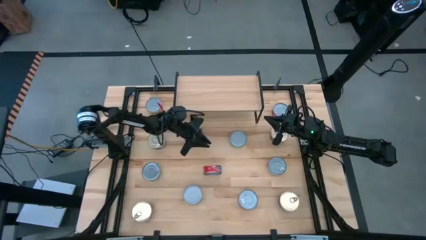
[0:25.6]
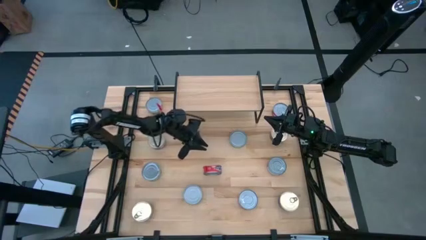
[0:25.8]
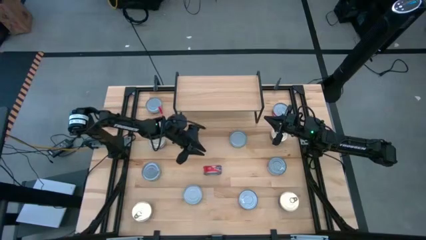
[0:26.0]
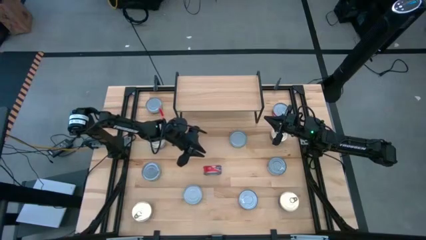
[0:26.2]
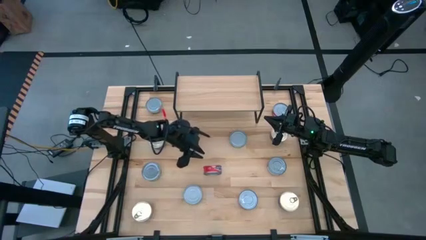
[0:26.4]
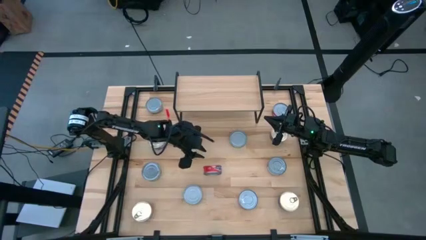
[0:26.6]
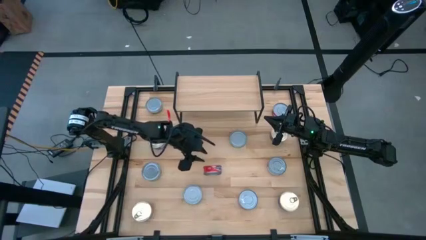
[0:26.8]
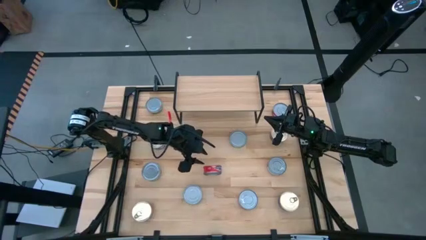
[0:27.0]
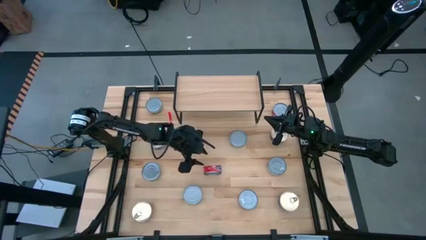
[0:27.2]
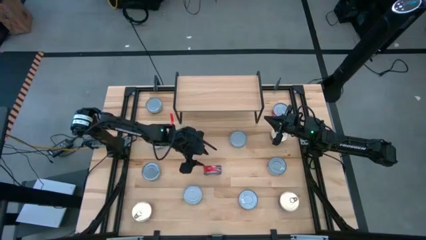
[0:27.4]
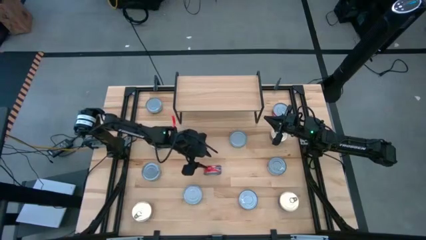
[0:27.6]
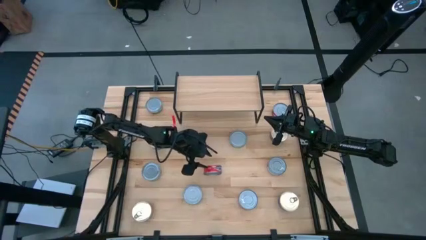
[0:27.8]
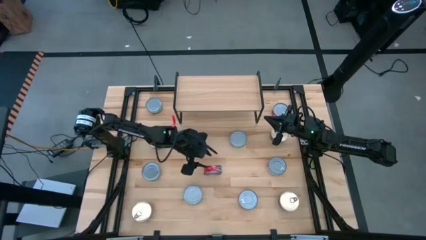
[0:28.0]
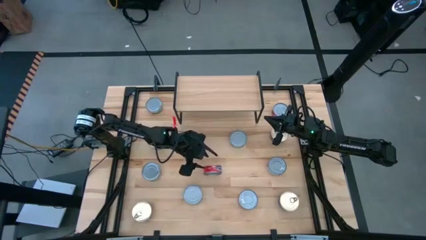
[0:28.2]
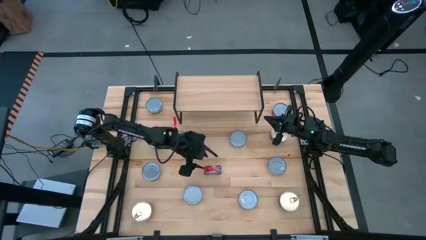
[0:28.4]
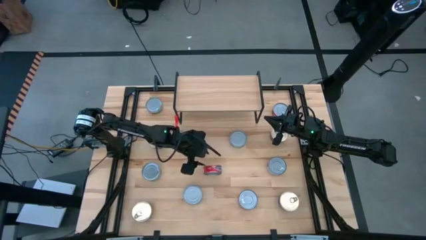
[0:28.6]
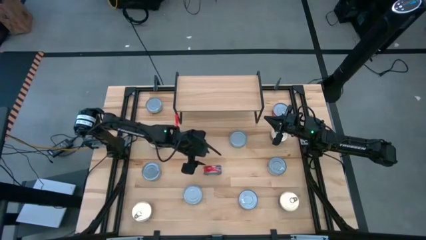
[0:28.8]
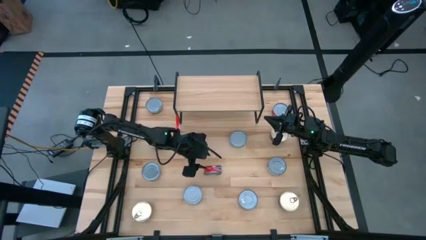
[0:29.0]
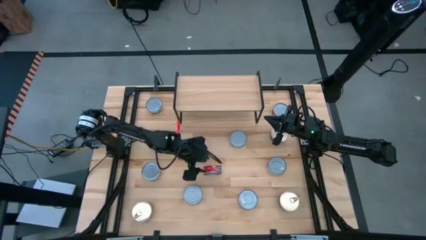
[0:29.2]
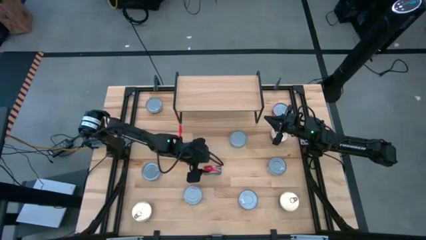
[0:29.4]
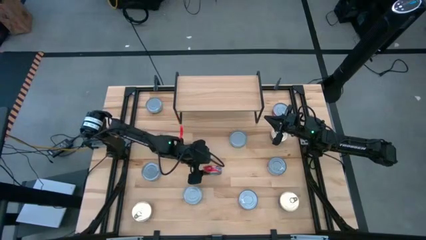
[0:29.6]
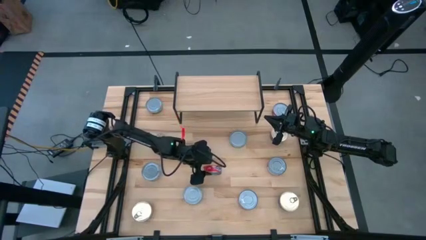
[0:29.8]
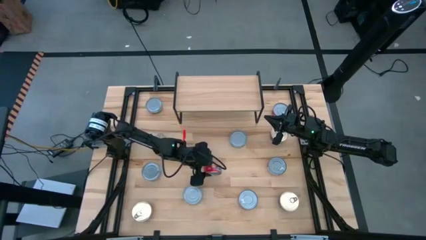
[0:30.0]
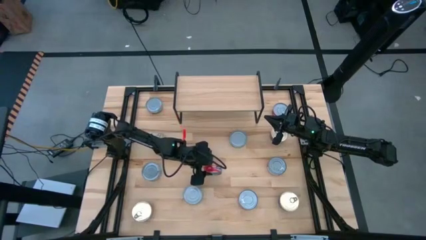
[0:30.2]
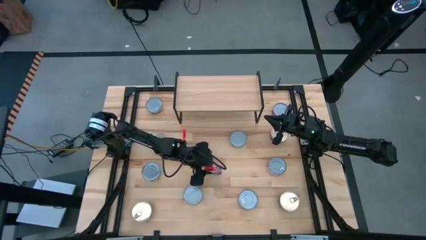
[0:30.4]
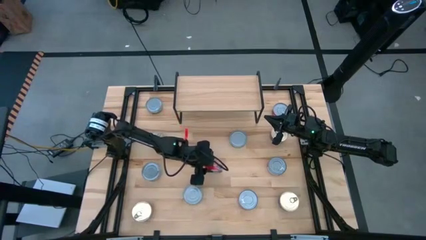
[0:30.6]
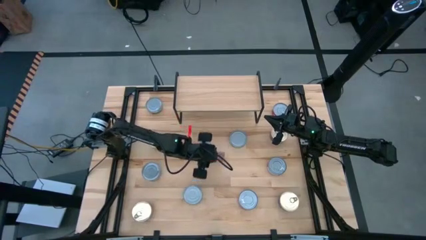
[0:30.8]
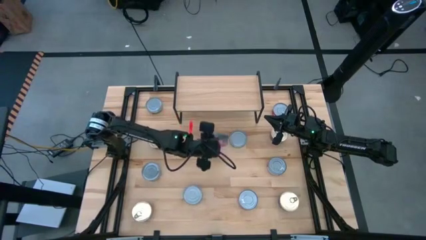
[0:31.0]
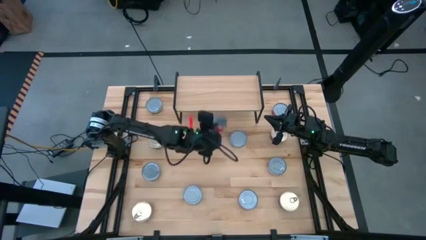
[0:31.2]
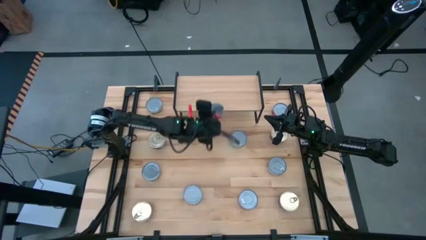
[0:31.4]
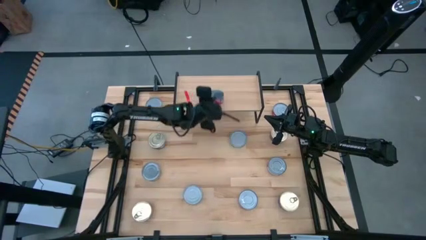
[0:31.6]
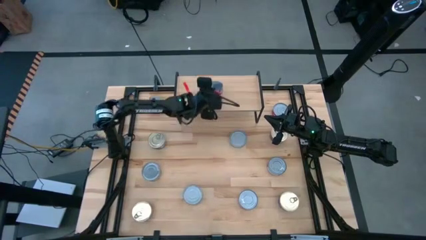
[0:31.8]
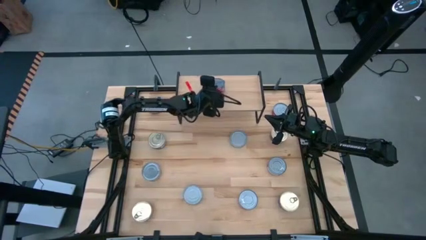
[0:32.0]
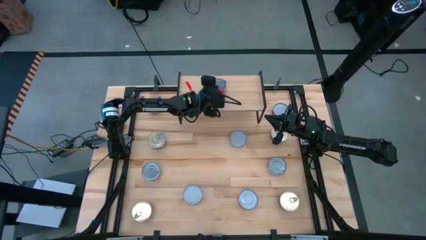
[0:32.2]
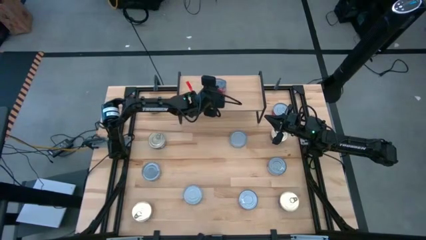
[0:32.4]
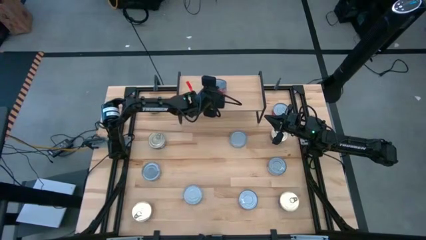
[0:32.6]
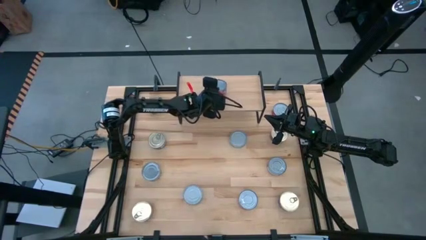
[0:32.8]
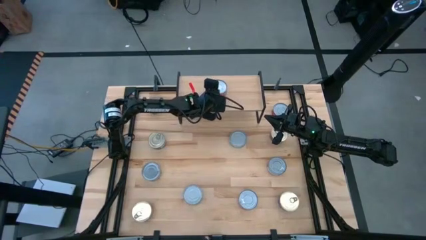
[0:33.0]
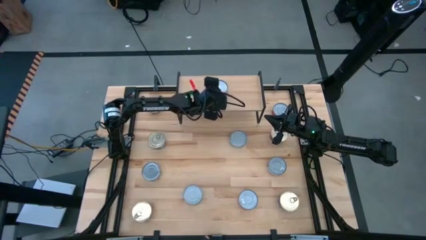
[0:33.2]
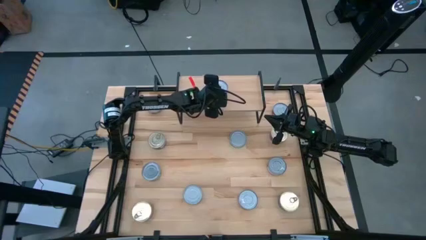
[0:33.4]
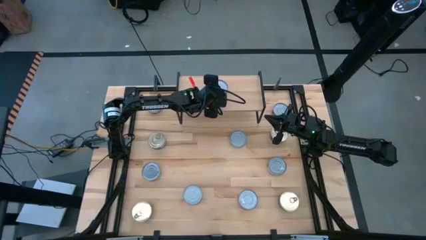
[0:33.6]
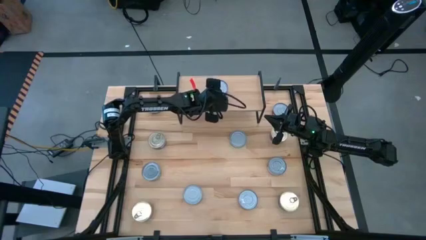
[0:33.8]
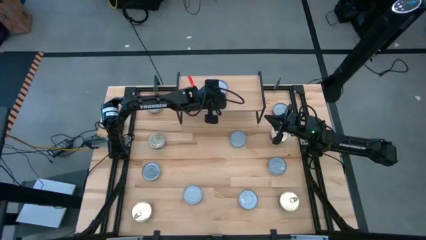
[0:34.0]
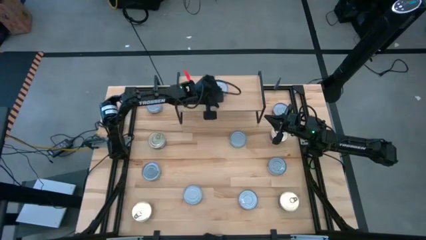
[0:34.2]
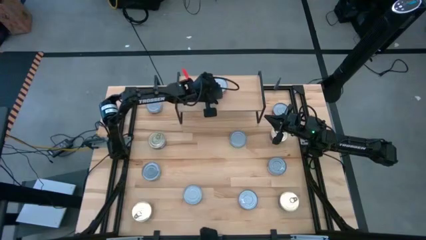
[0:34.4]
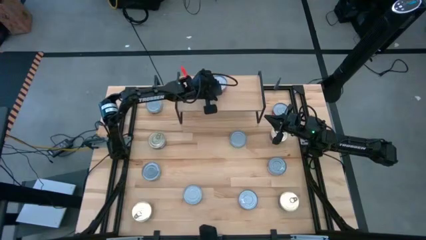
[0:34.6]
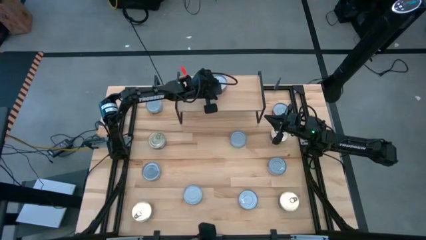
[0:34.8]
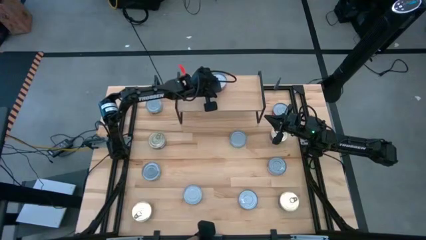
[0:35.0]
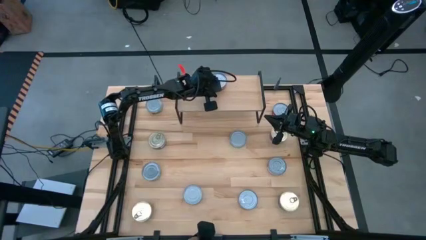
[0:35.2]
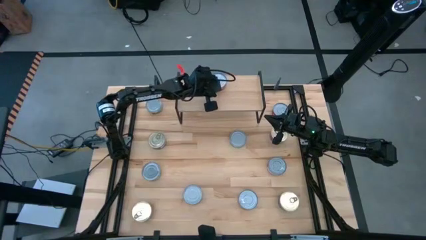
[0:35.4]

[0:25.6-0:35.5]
Task: Stack canned seafood by type on shelf
Put the red tuna can on the shelf

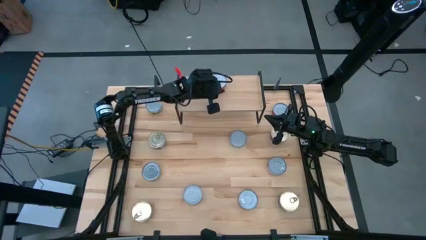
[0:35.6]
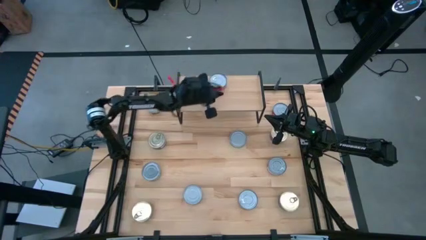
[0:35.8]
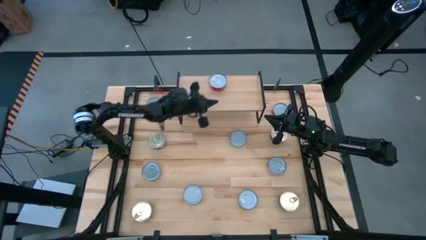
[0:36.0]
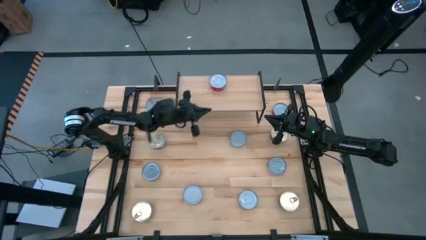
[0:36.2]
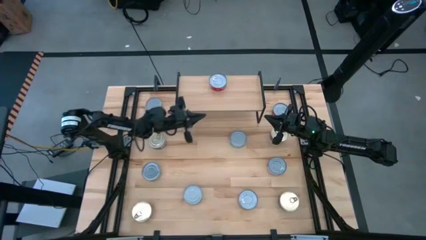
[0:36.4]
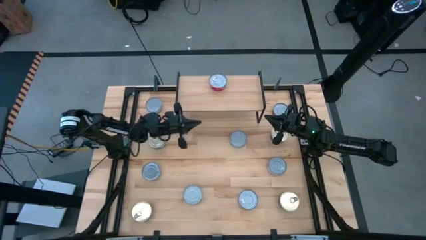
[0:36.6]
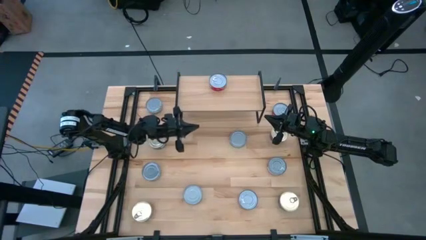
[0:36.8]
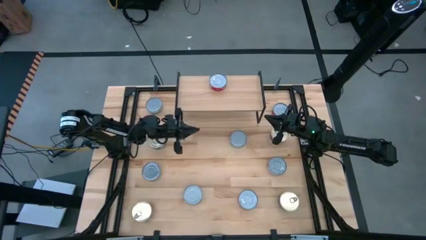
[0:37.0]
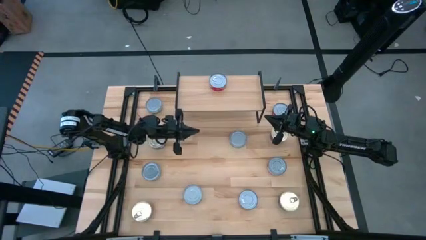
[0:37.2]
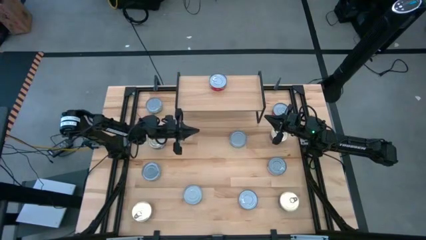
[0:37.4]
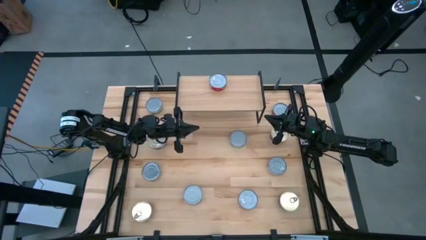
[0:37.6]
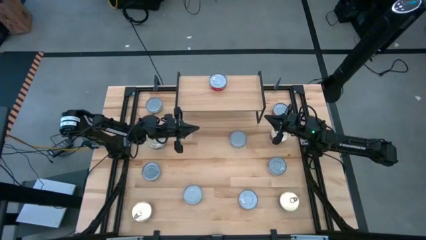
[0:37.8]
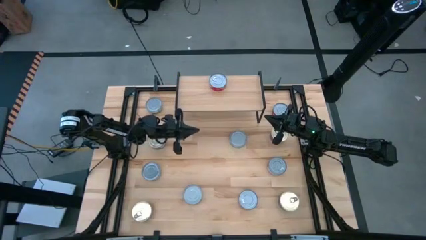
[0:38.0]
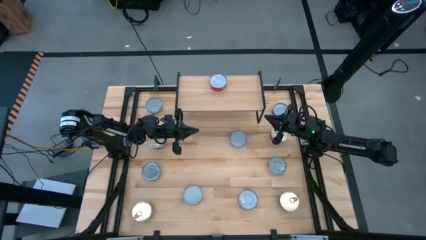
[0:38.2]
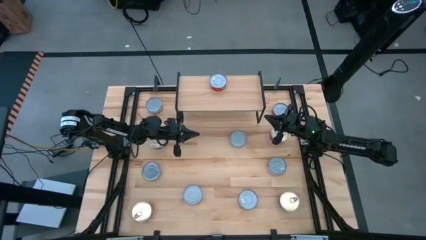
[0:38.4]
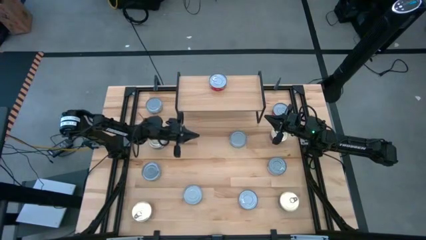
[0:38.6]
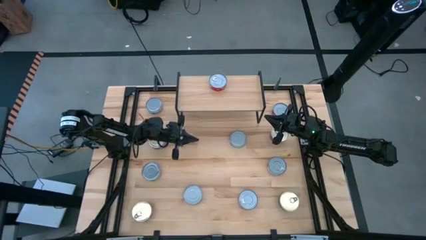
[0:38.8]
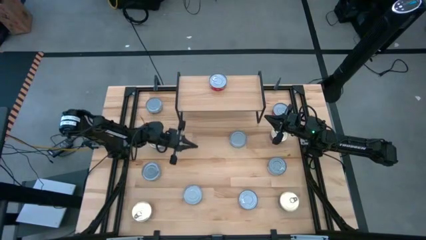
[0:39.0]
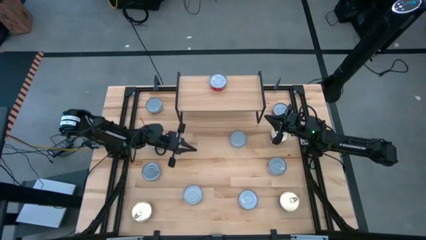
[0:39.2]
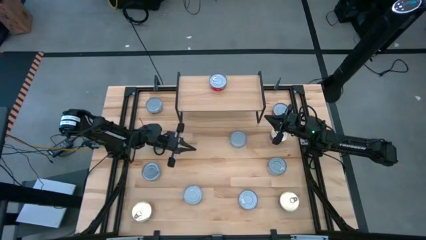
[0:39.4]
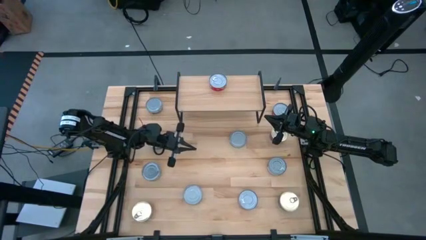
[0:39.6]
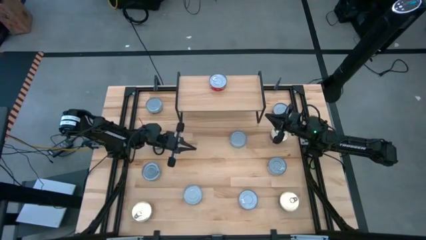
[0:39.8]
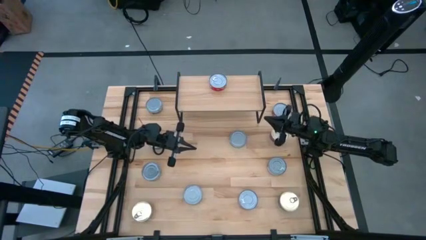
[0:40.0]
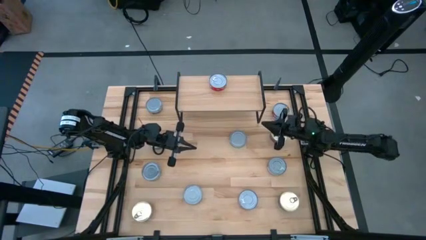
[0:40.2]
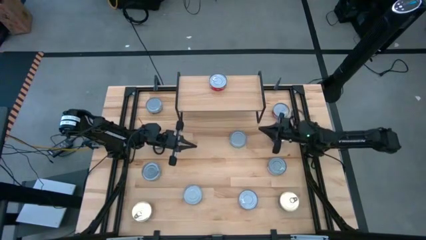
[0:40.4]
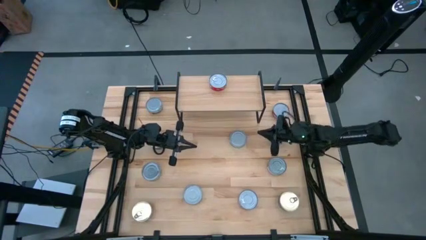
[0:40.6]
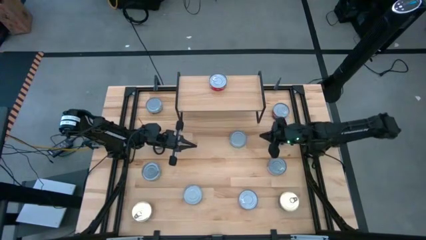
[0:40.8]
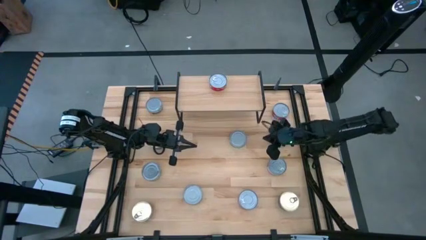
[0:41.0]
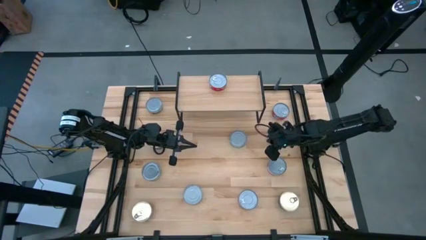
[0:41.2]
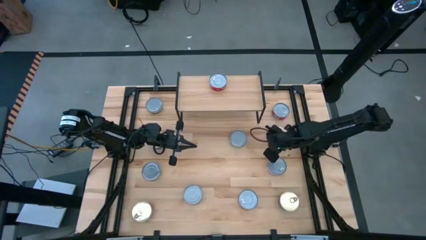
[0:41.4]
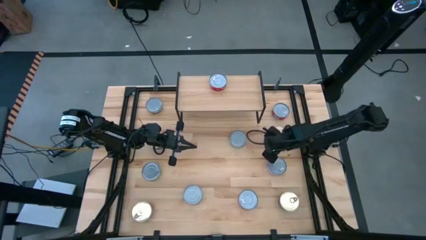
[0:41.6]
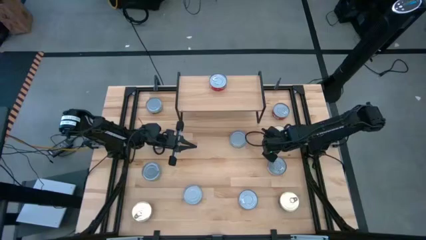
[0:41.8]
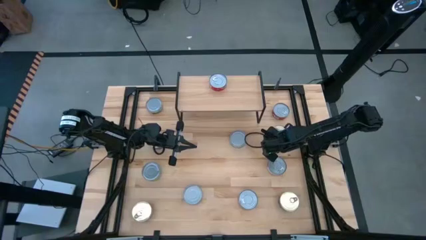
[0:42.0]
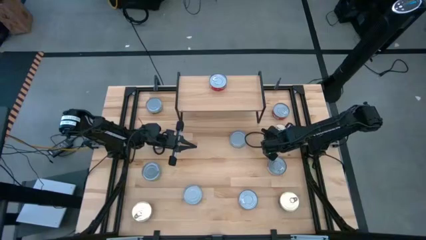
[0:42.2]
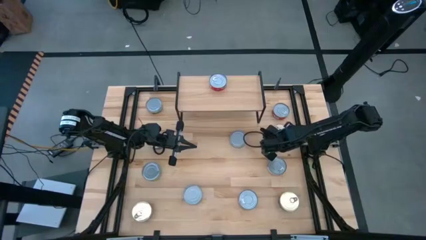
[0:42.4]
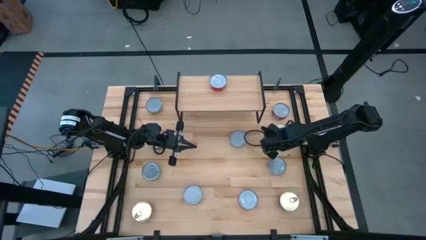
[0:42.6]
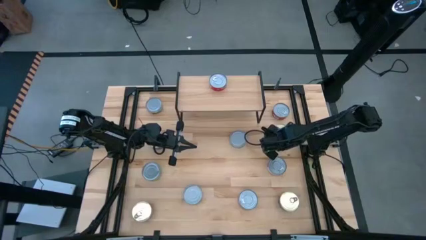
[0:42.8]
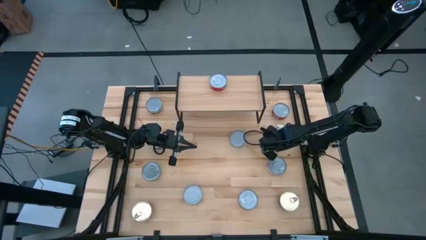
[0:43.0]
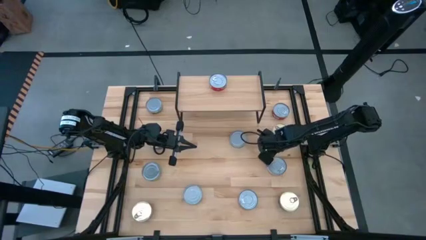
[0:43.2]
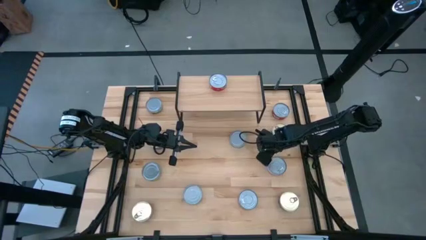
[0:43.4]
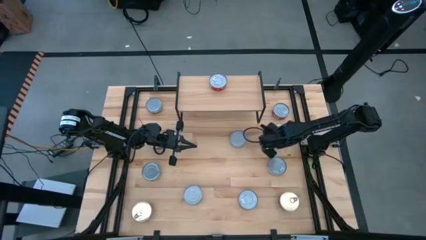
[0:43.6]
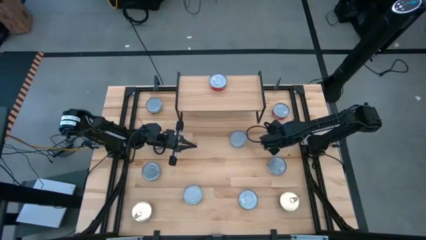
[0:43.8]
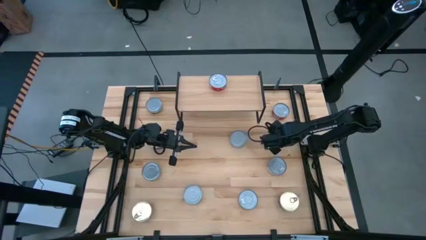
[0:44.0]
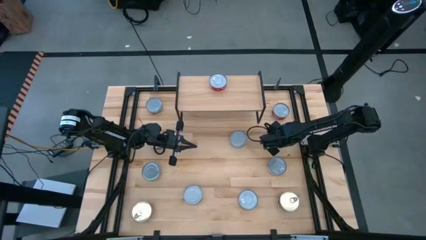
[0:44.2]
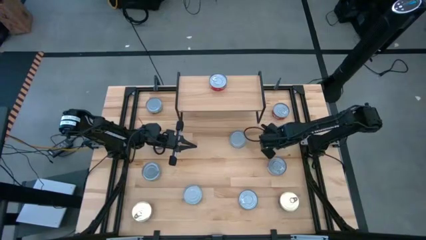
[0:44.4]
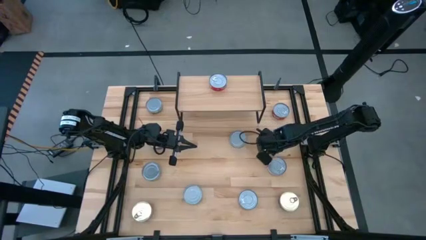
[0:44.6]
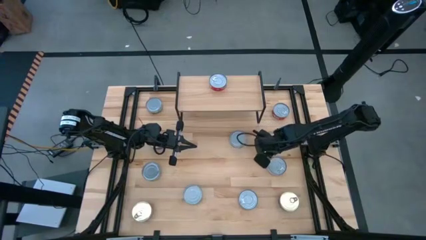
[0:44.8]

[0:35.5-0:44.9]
Put the blue and pink tuna can on the shelf
